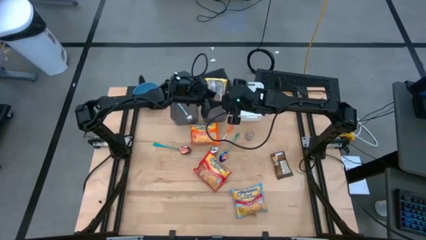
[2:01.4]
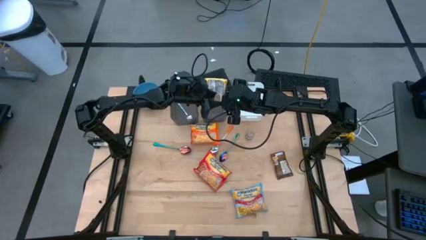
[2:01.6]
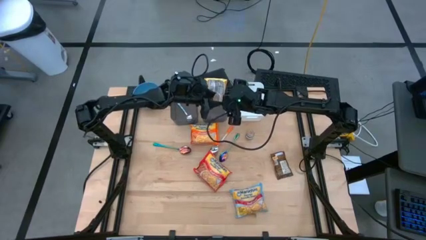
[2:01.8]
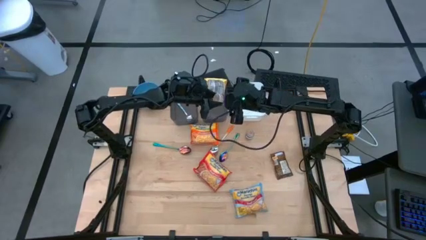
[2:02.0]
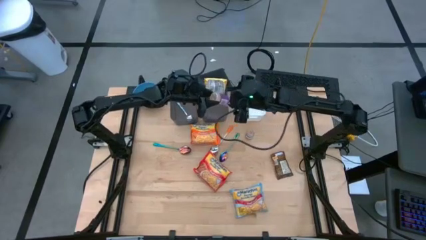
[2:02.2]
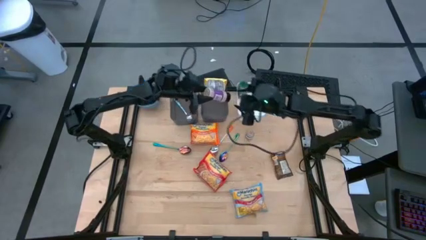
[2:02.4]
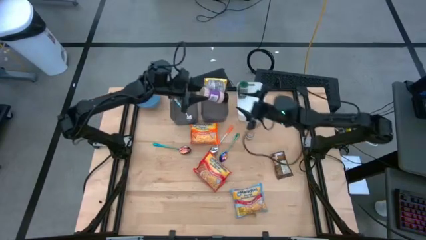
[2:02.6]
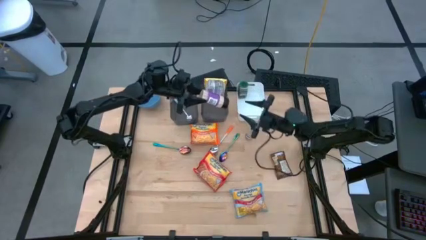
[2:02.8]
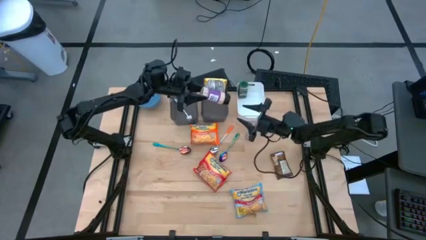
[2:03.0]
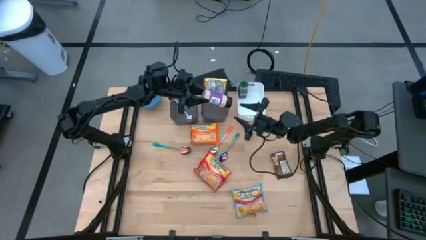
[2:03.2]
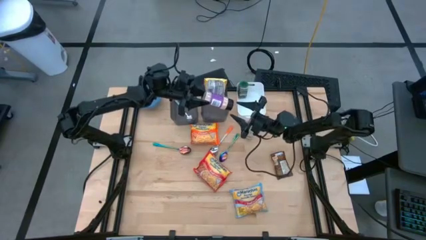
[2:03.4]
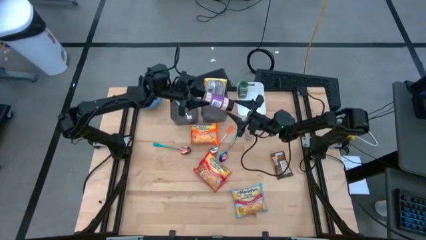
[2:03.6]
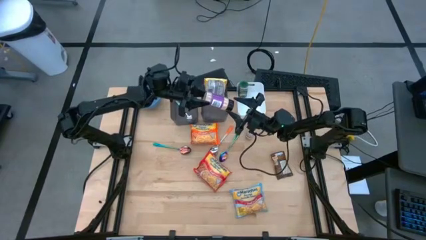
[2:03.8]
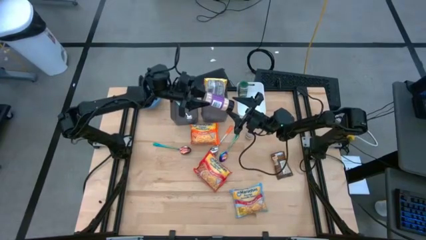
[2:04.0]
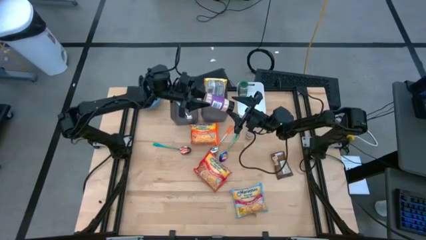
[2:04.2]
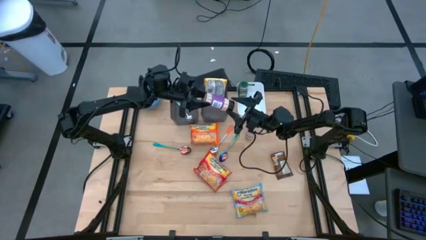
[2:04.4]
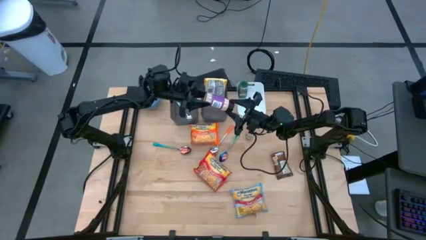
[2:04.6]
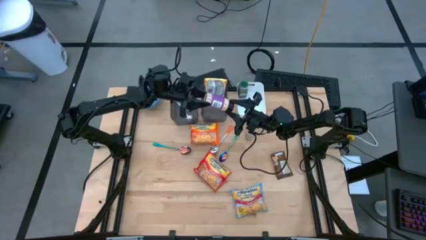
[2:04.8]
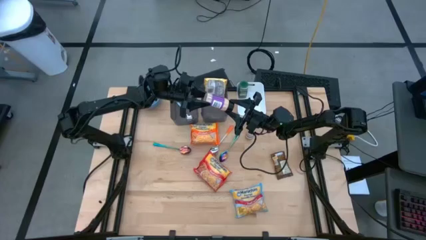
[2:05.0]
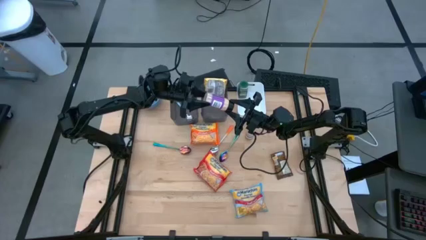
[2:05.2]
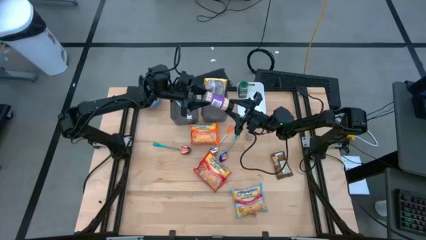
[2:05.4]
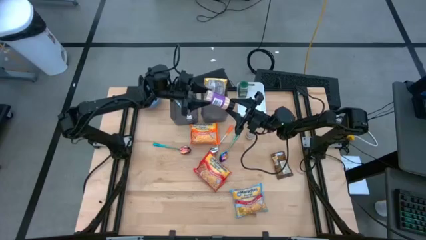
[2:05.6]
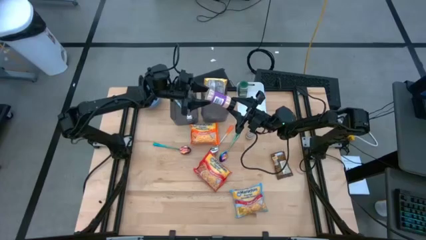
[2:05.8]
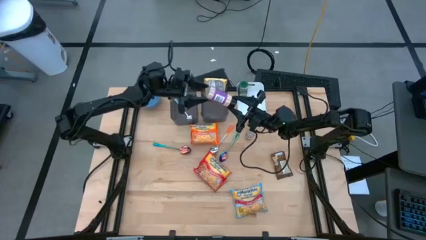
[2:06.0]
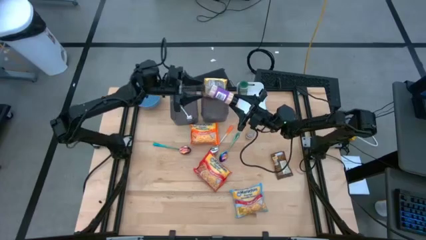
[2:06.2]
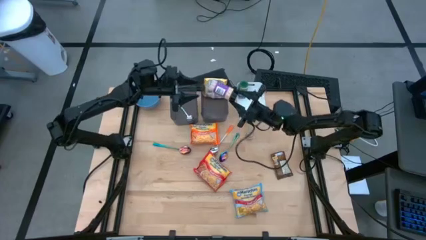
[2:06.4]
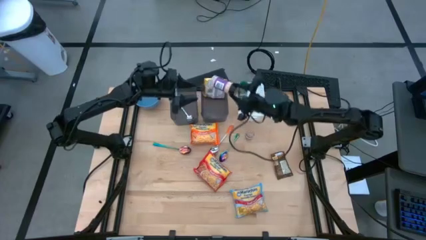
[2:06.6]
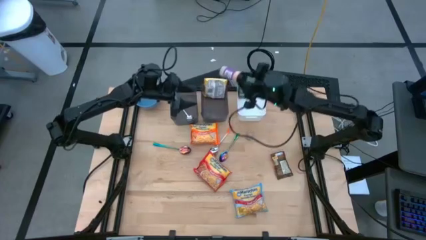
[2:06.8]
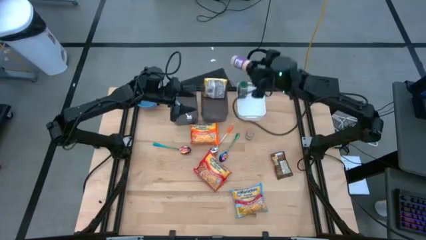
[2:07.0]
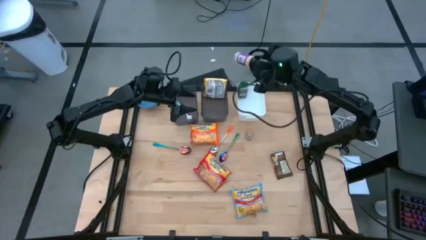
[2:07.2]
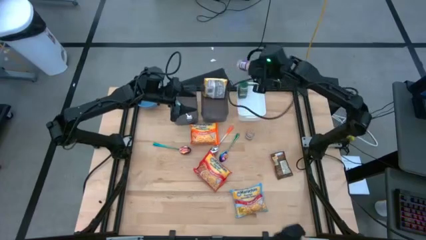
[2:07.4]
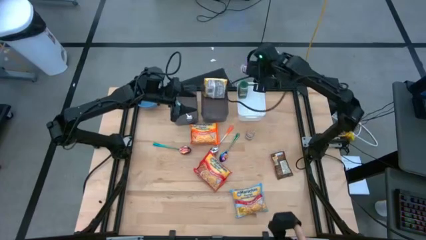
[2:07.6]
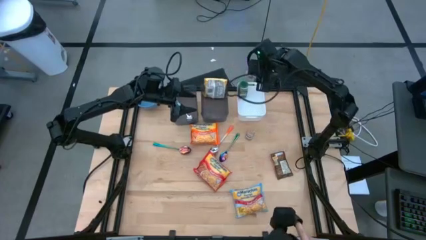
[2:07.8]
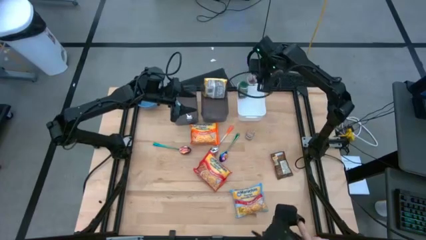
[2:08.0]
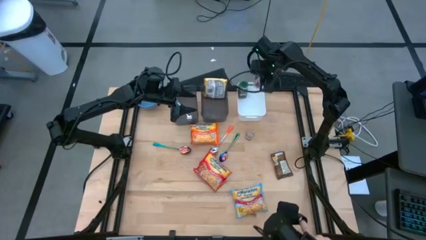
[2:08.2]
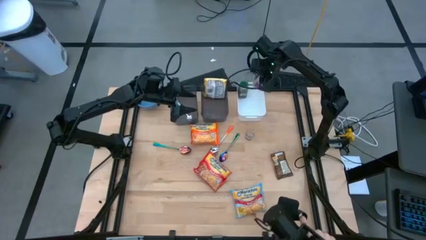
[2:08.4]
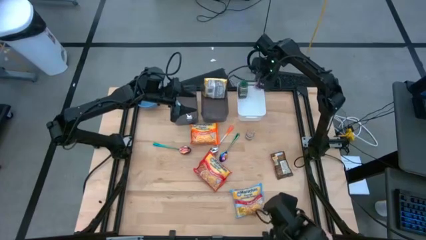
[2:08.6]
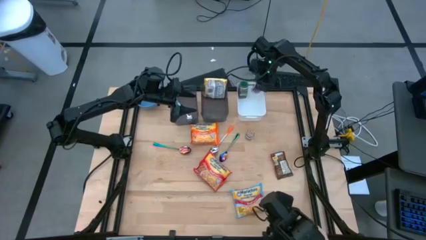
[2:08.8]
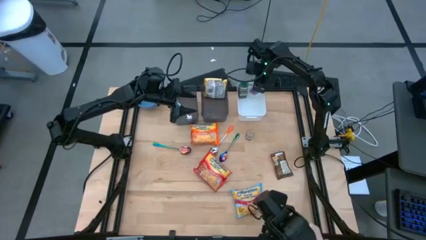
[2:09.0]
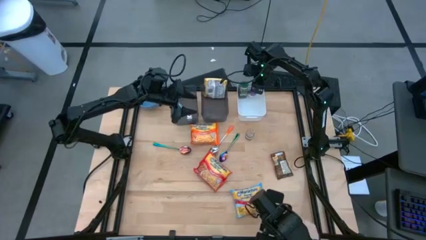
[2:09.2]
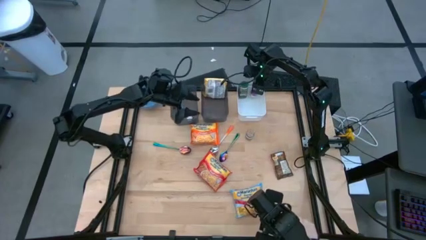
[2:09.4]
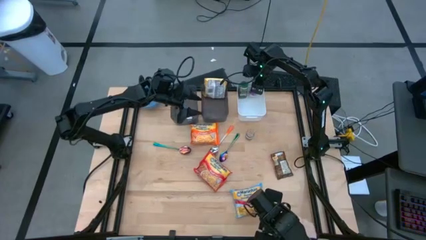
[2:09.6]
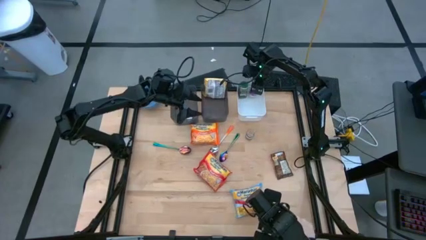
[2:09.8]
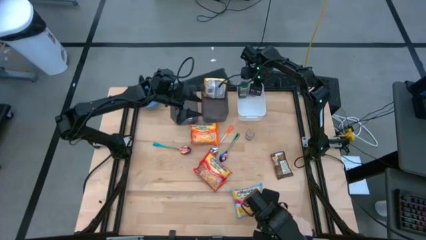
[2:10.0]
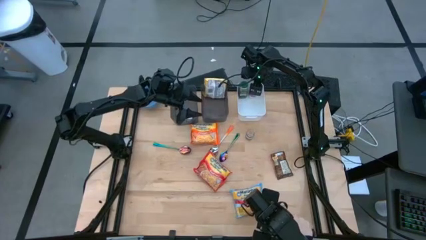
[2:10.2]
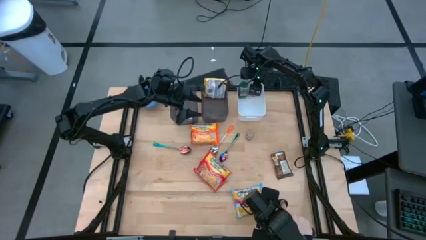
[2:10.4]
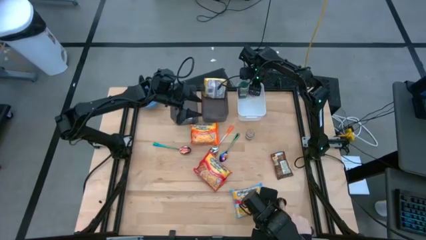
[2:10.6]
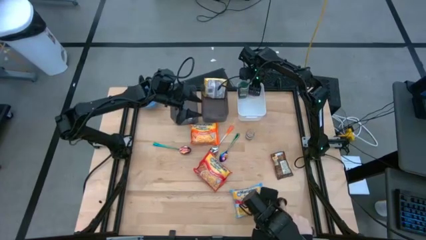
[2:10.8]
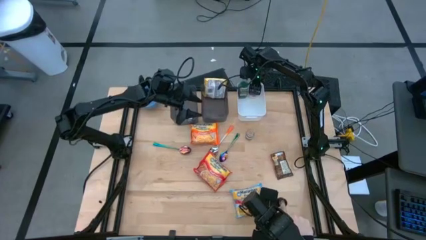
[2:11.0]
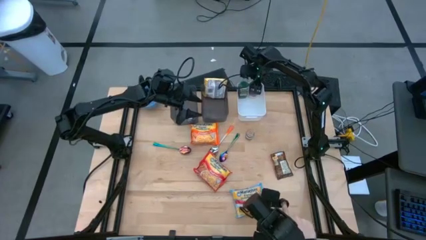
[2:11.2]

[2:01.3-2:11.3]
Task: Pick & Place Food Item
Put the purple seasoning bottle into the white bin

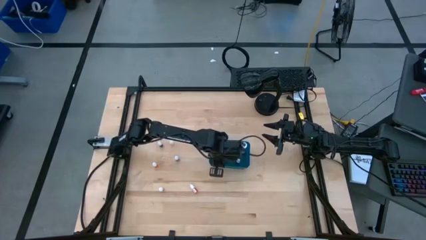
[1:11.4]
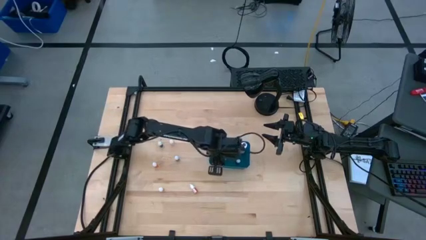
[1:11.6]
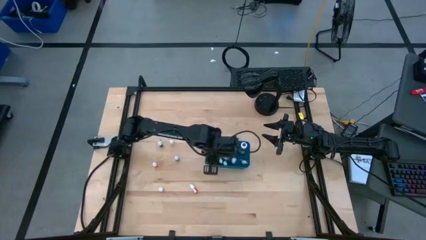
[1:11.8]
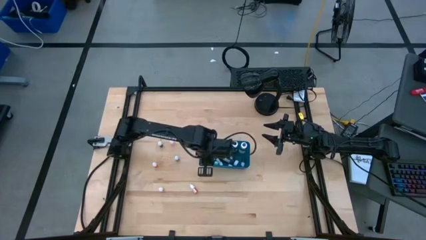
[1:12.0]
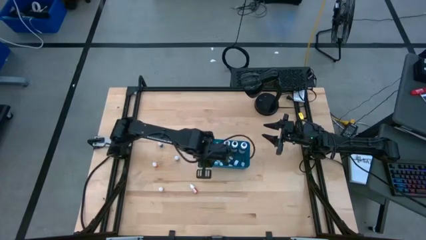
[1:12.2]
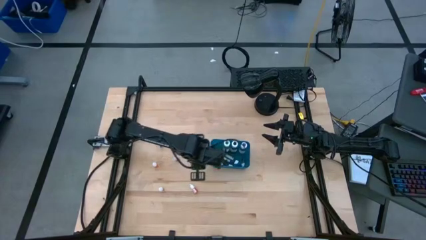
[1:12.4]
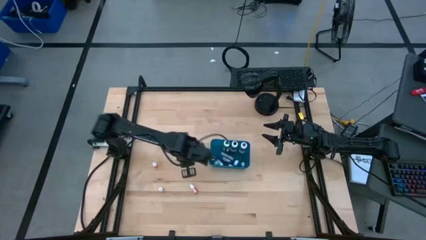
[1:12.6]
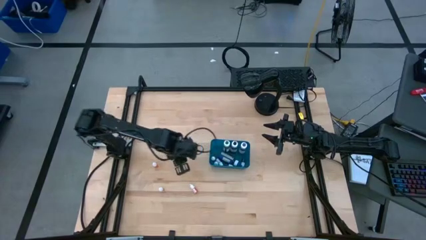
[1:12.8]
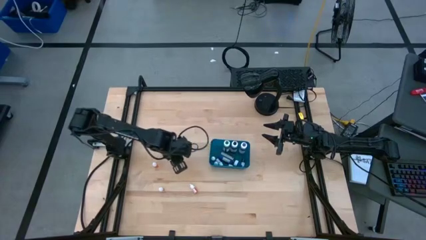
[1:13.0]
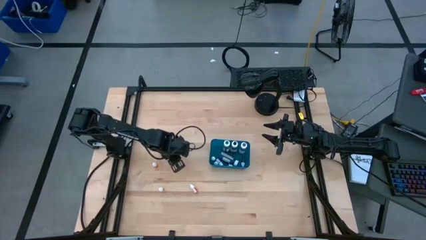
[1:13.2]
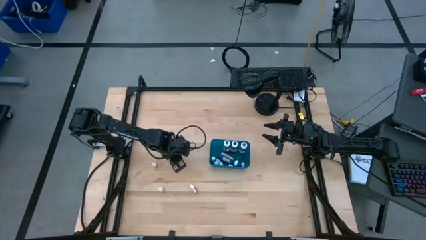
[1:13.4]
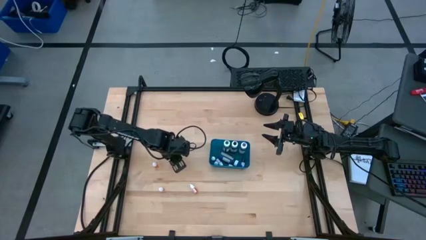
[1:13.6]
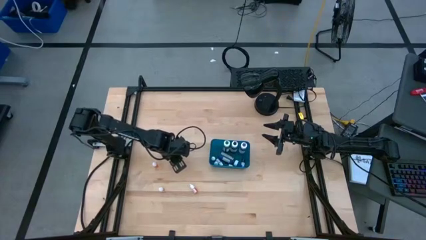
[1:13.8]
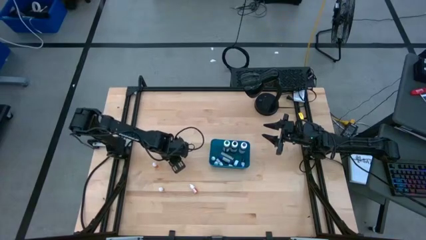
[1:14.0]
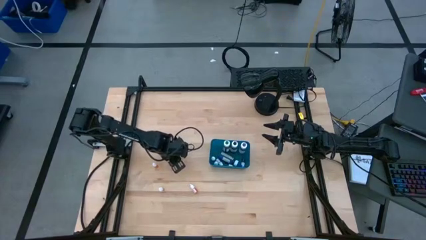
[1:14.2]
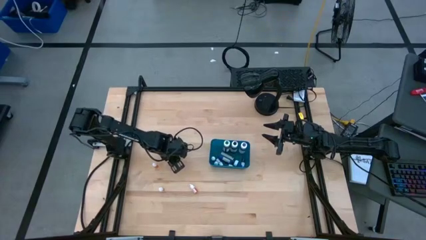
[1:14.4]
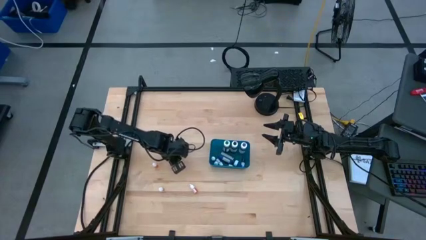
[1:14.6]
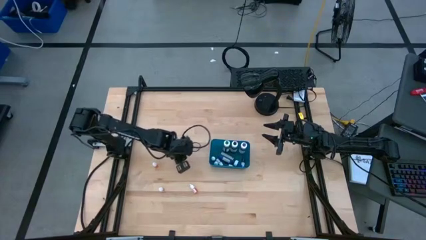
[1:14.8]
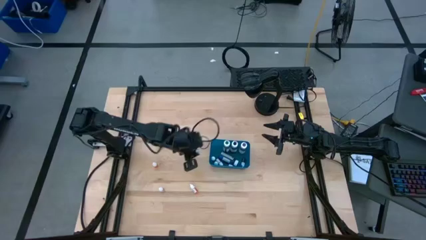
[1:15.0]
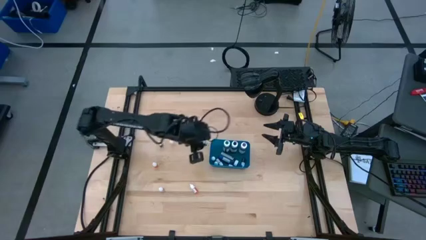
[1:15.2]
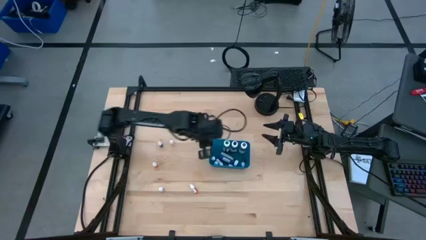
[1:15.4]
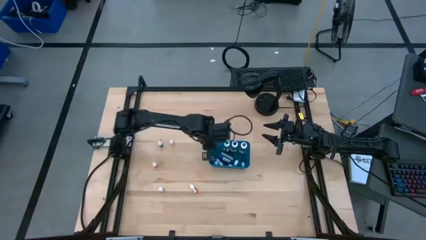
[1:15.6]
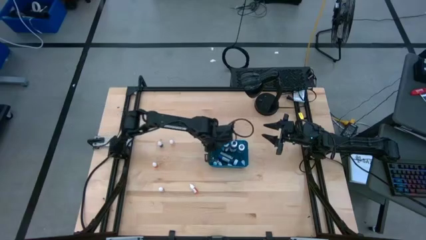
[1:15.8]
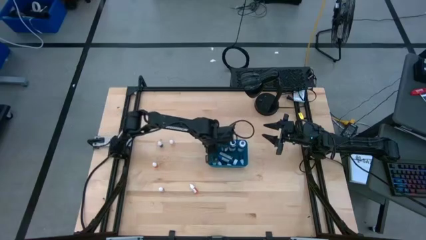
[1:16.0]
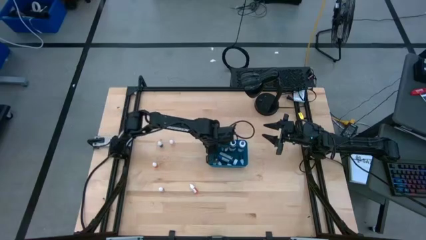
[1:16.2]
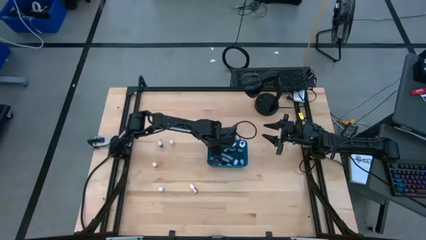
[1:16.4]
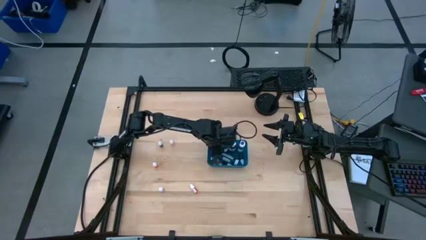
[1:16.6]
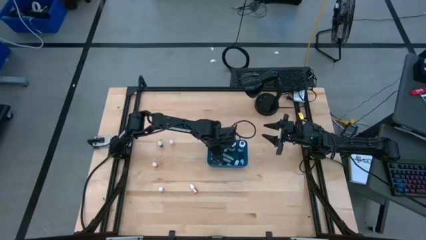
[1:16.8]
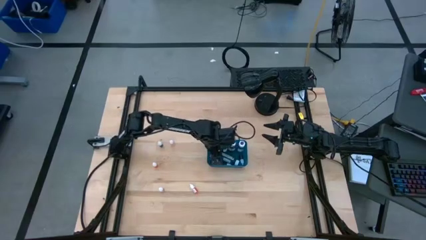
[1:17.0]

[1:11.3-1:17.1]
Task: Pick & Place food coloring
Put the small purple food coloring bottle into the blue container
